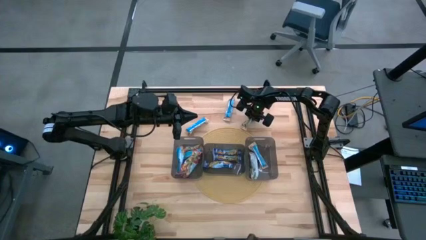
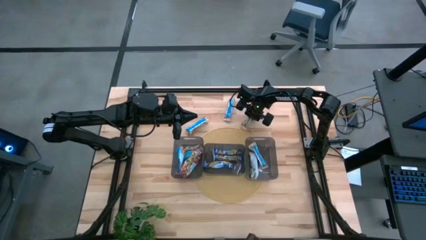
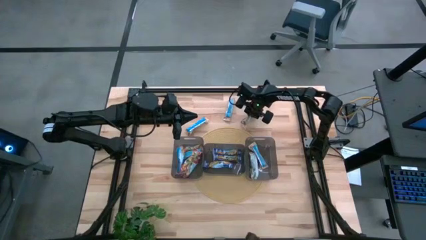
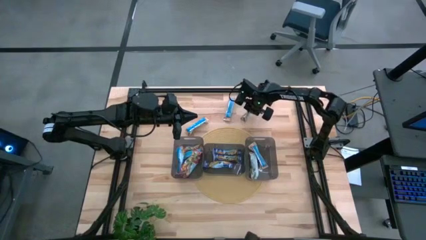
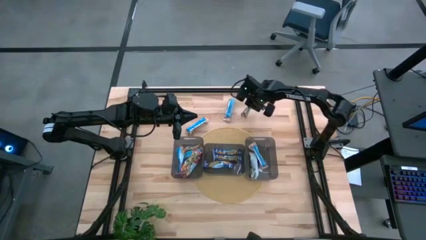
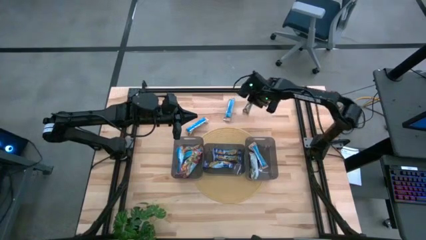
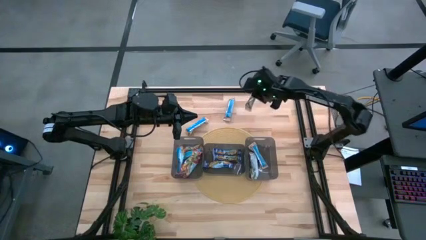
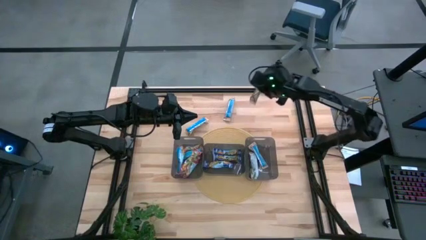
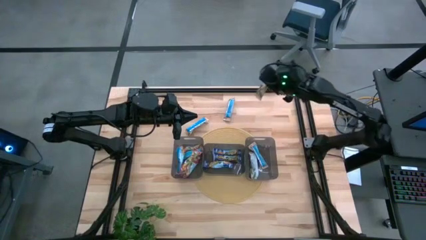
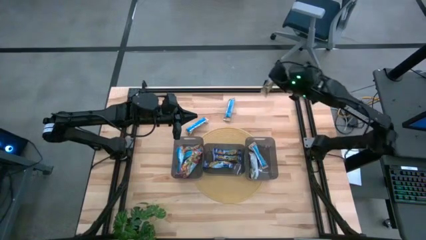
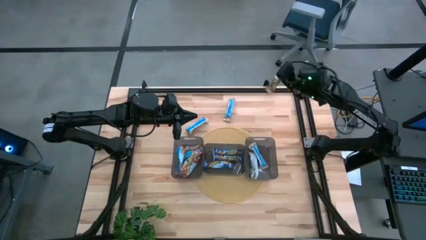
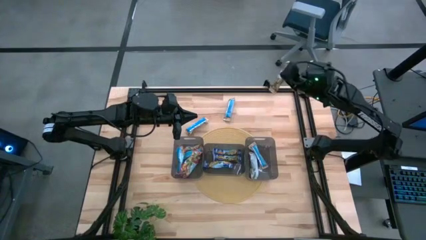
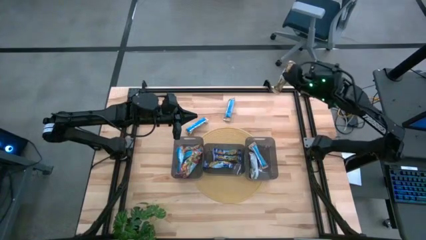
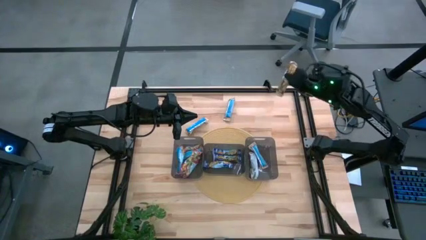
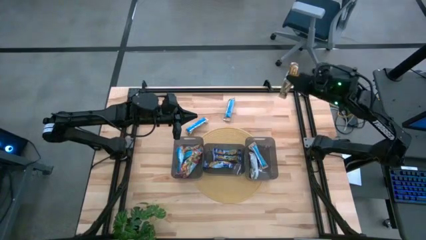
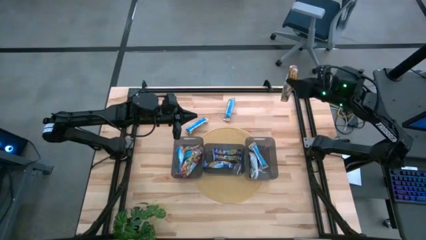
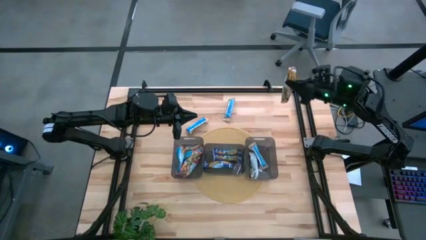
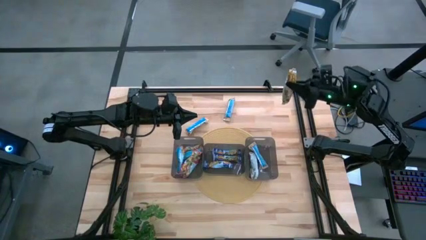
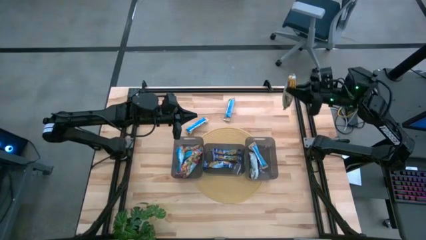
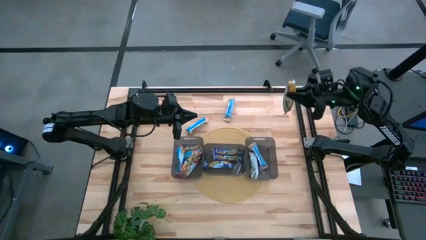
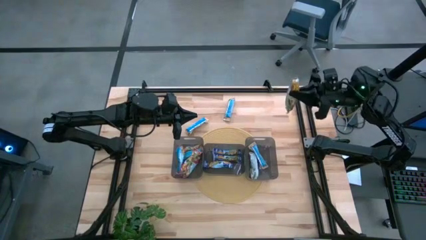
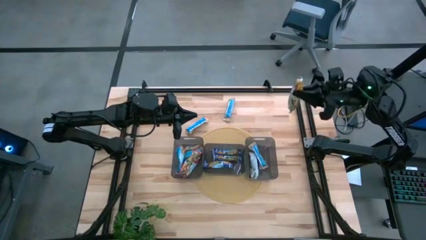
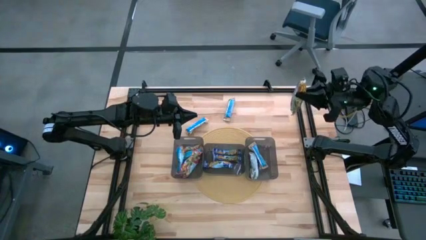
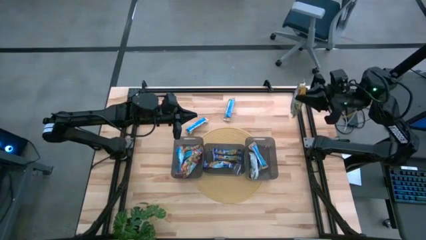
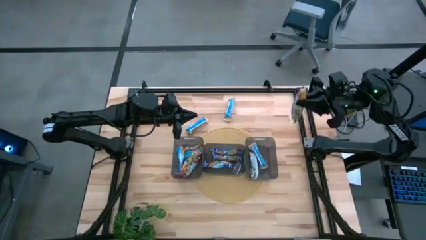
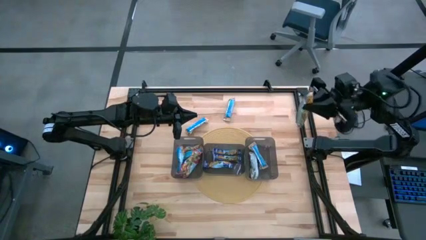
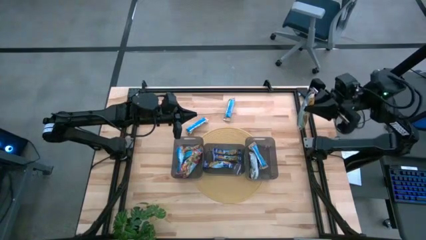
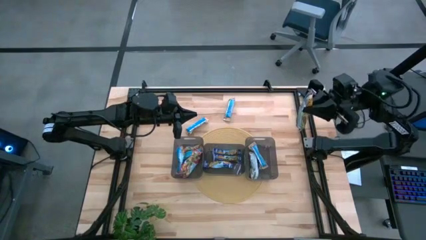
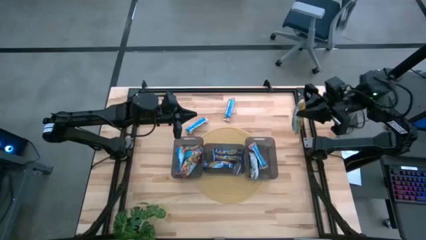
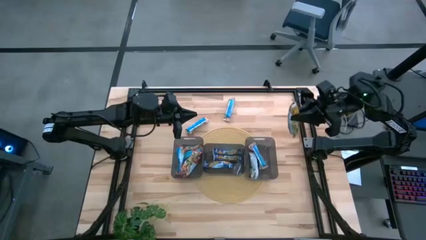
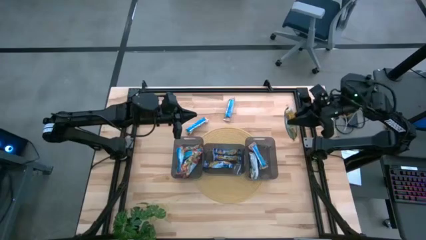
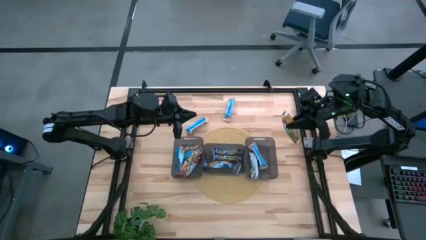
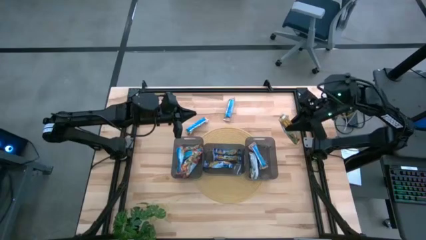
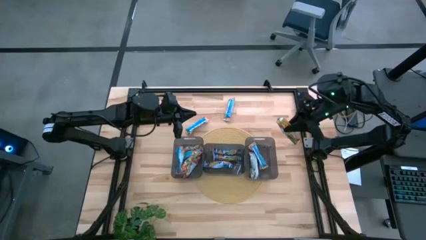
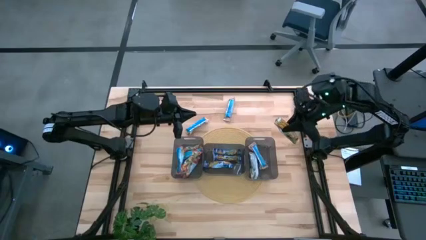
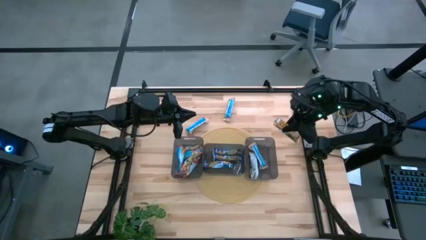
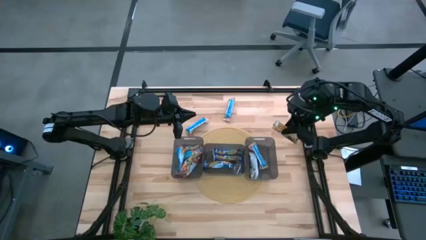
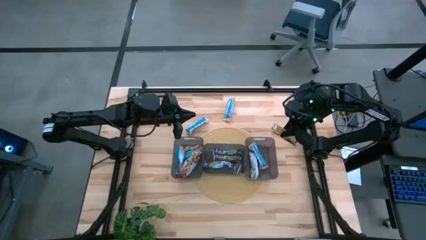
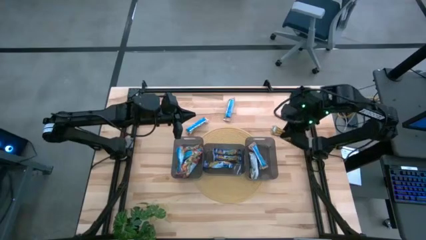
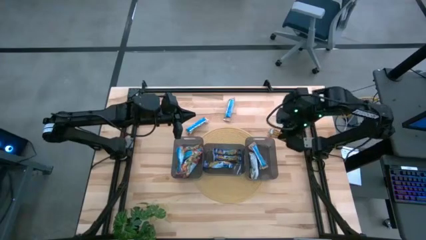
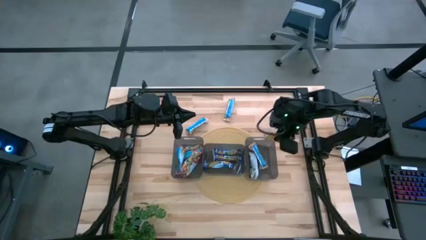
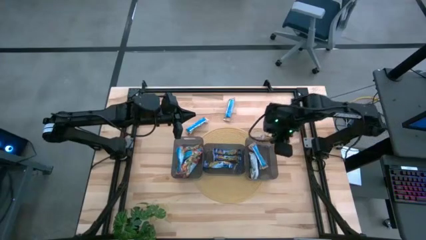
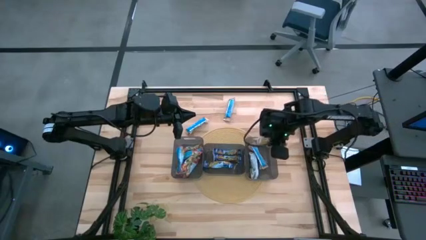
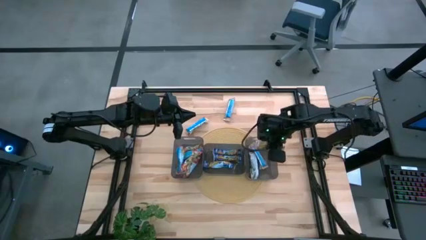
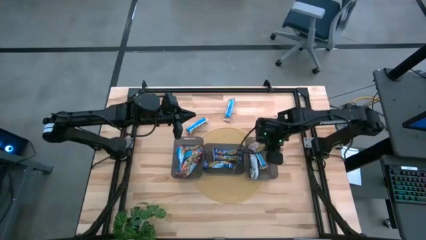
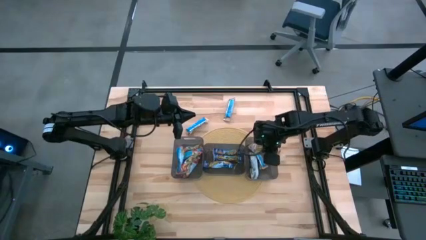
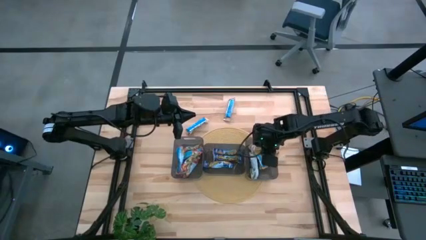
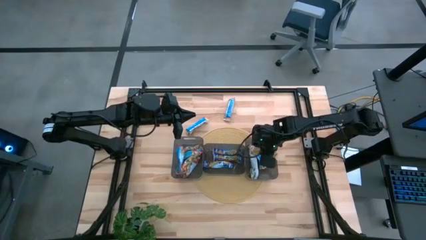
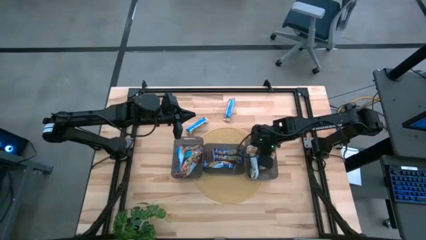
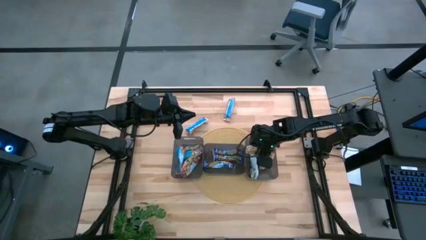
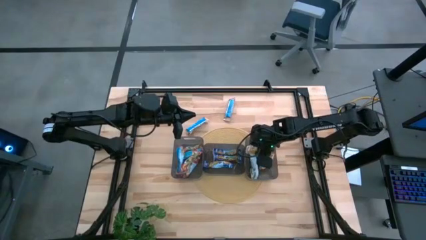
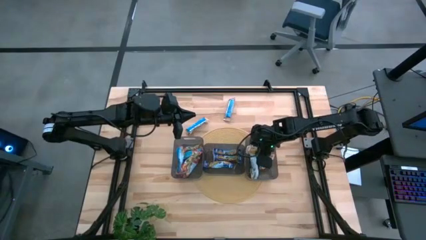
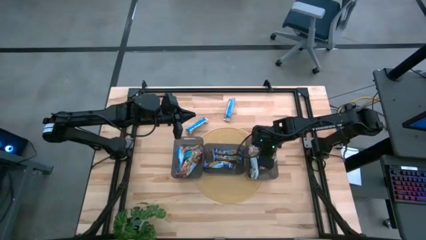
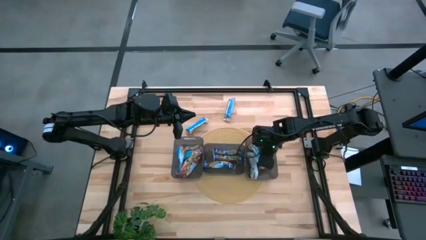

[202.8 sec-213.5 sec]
Task: Pick and place Granola Bars by type
Put the orange granola bar into the right black bin

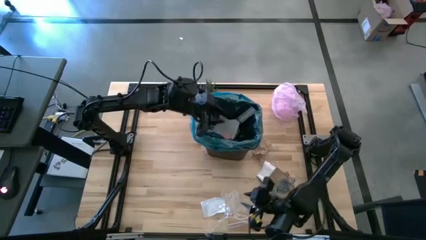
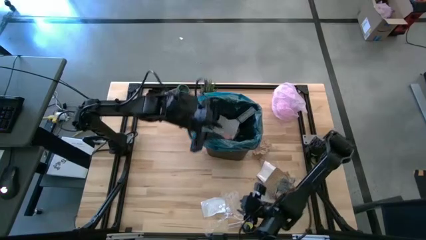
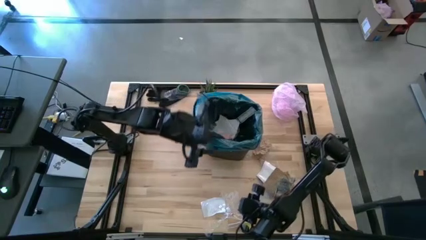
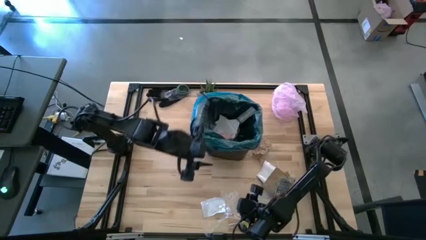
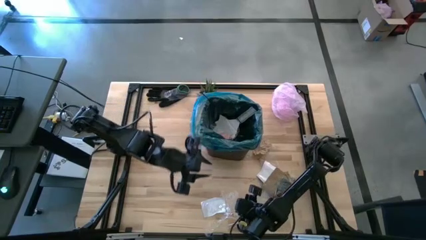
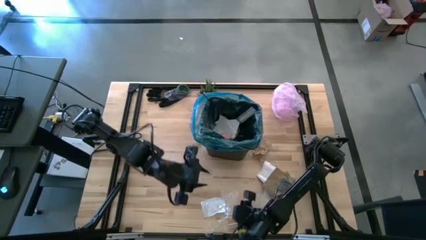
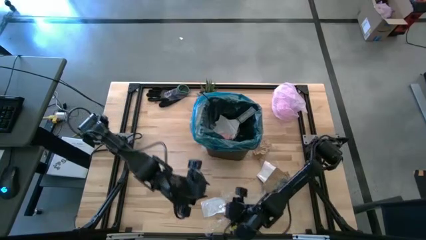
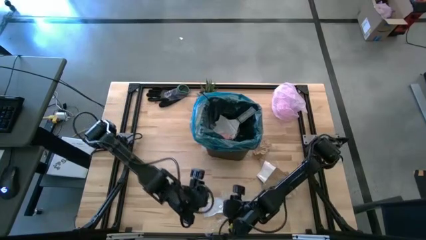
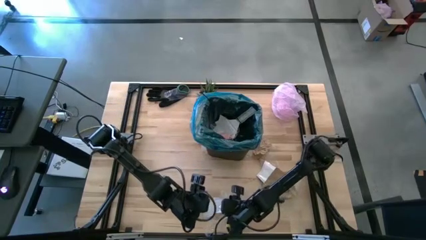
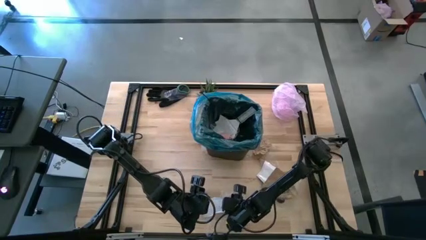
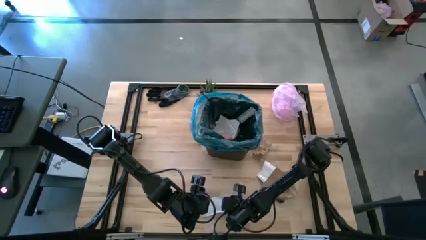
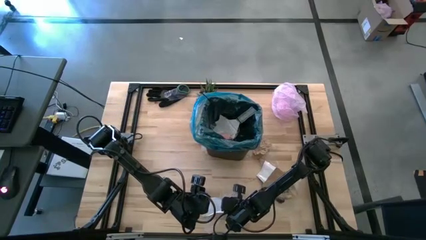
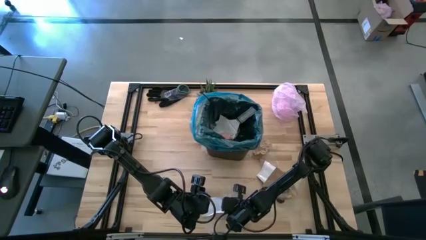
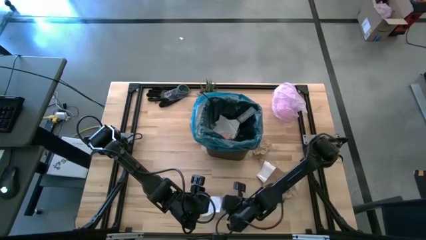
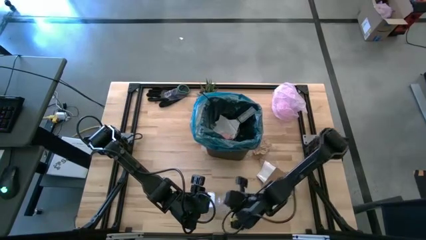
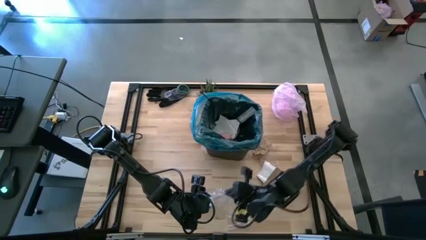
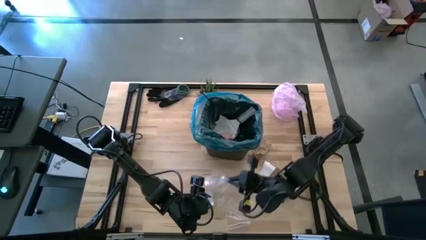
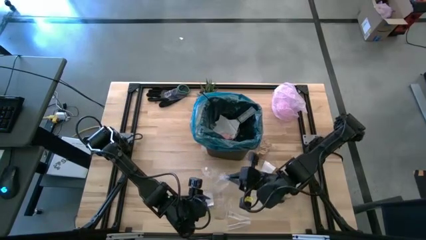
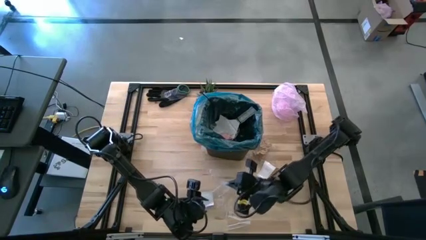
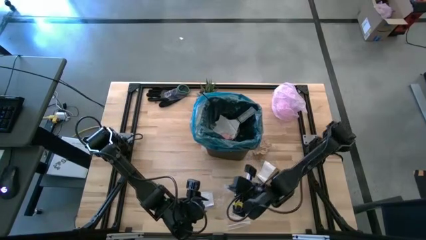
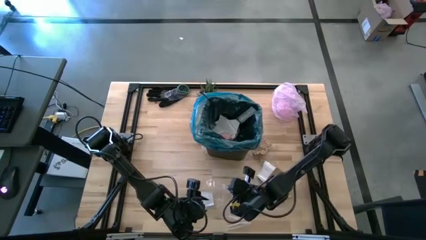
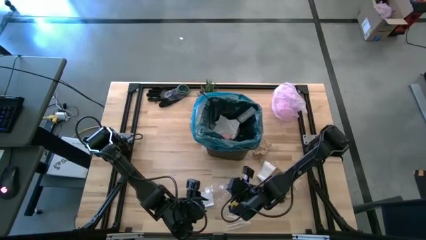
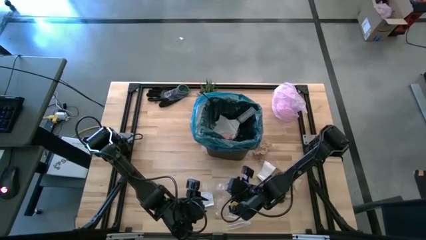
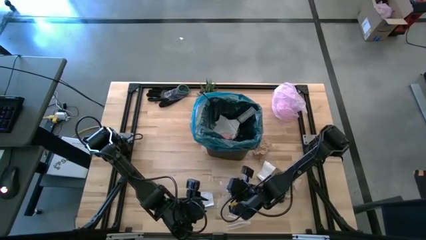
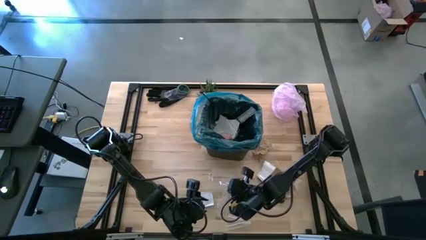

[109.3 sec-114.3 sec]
Task: place trash/remove bag and relplace
Put the transparent plastic into the trash bin
